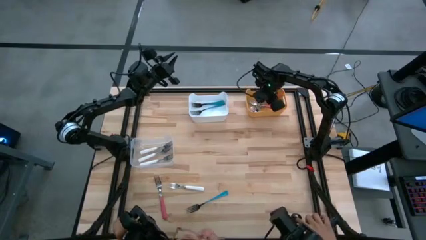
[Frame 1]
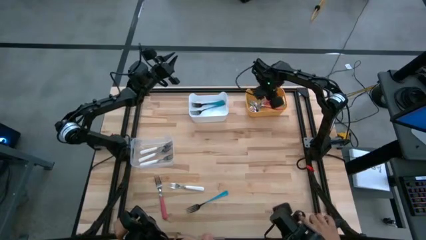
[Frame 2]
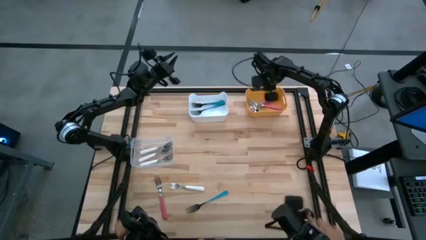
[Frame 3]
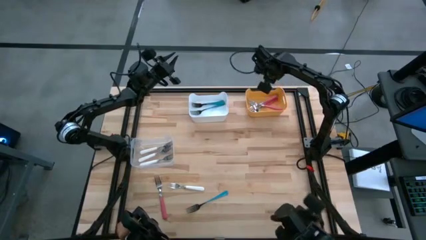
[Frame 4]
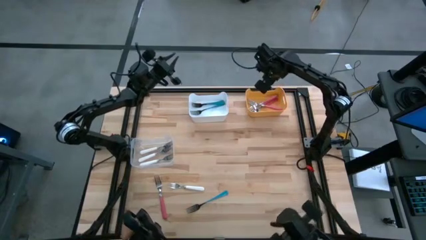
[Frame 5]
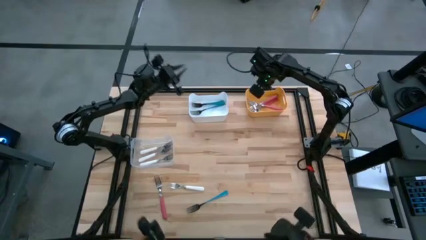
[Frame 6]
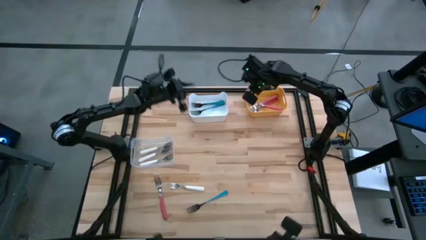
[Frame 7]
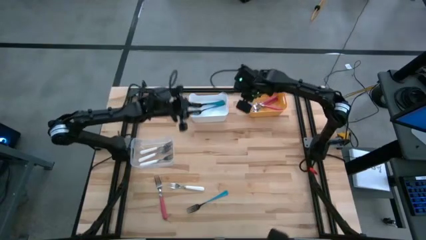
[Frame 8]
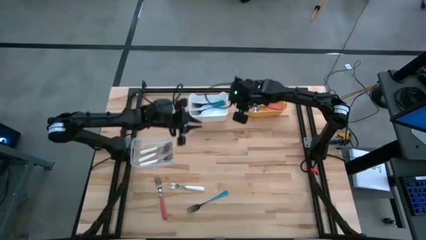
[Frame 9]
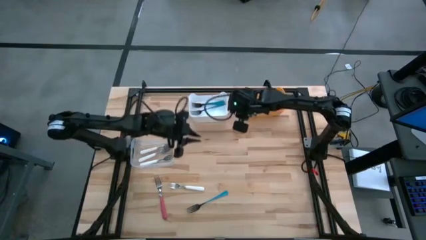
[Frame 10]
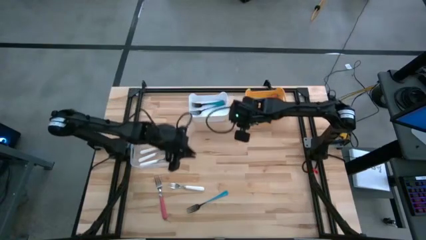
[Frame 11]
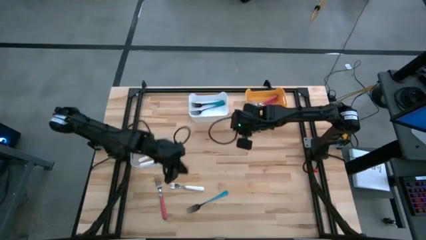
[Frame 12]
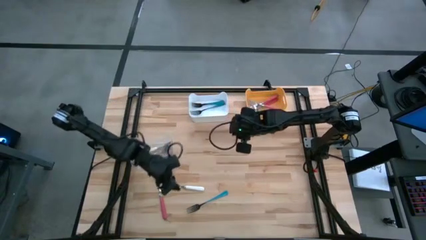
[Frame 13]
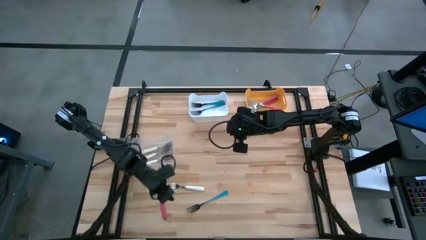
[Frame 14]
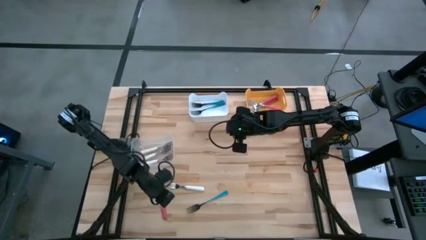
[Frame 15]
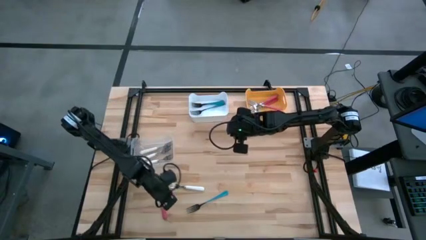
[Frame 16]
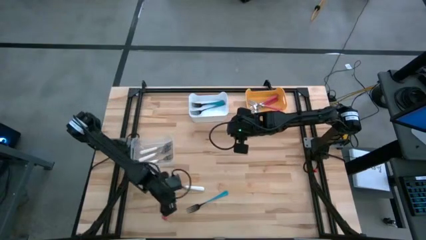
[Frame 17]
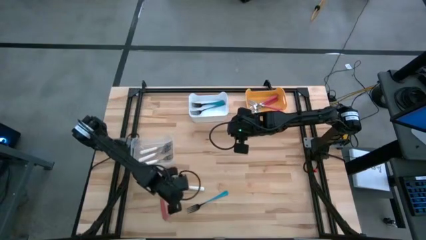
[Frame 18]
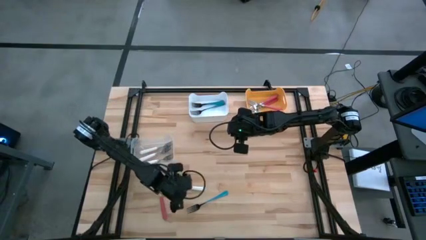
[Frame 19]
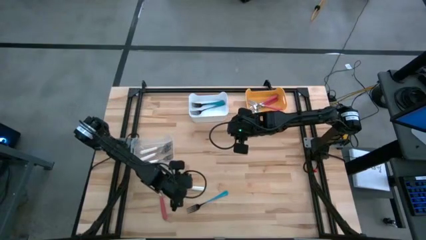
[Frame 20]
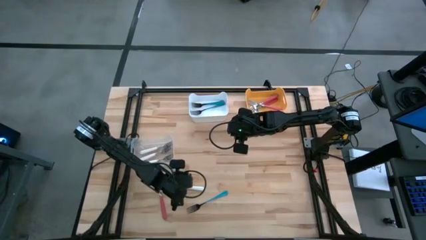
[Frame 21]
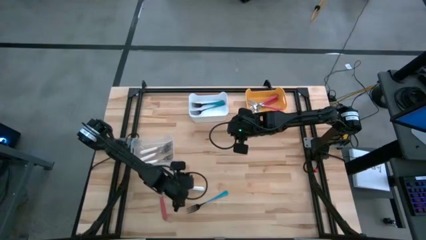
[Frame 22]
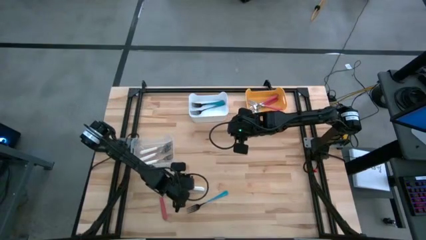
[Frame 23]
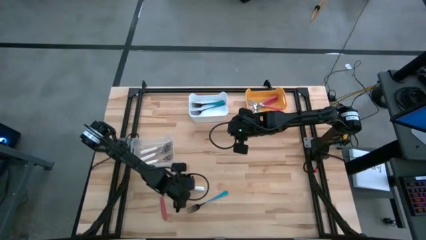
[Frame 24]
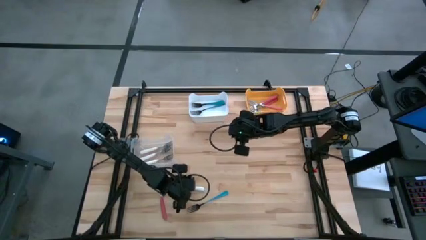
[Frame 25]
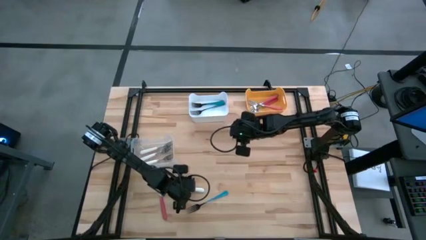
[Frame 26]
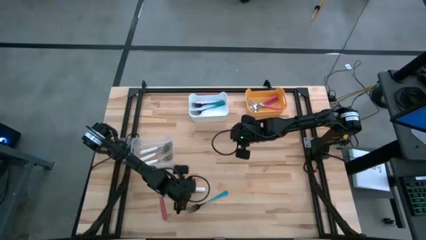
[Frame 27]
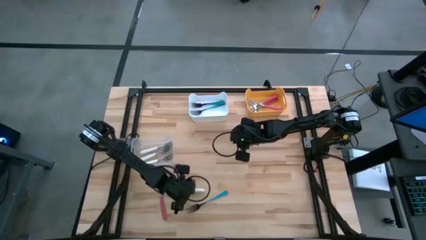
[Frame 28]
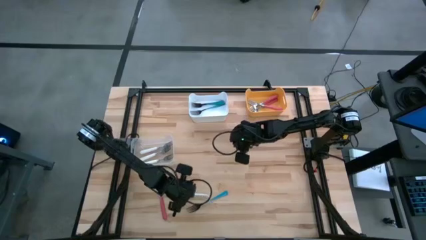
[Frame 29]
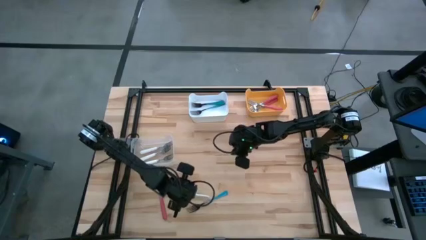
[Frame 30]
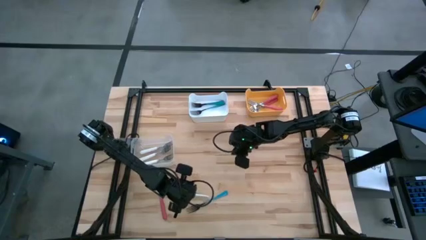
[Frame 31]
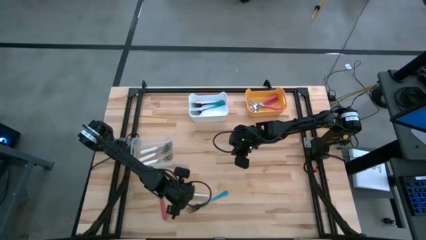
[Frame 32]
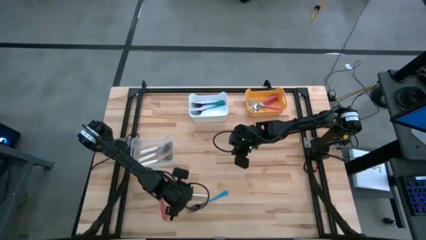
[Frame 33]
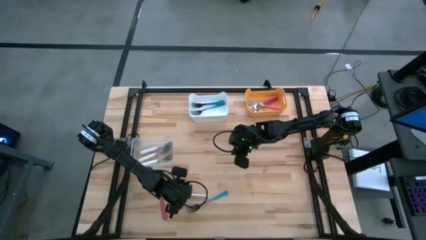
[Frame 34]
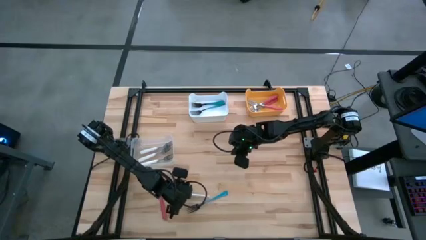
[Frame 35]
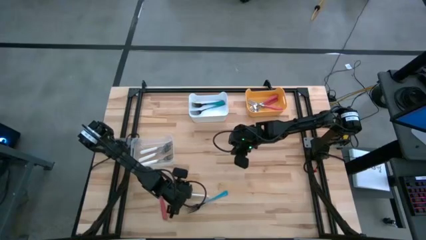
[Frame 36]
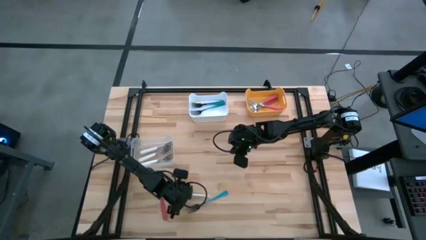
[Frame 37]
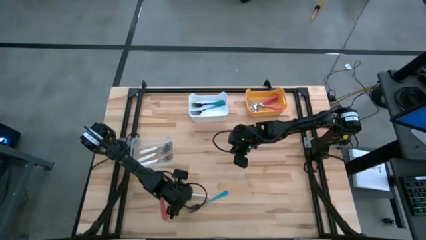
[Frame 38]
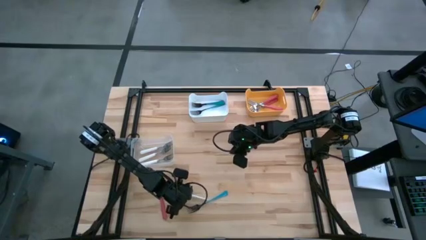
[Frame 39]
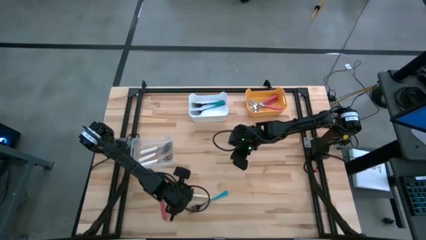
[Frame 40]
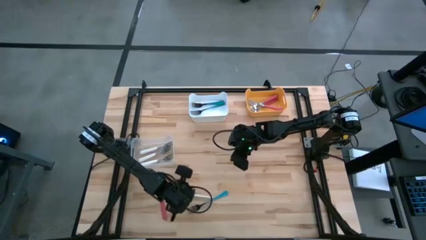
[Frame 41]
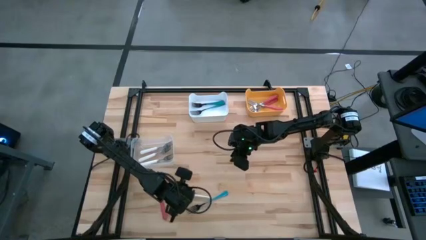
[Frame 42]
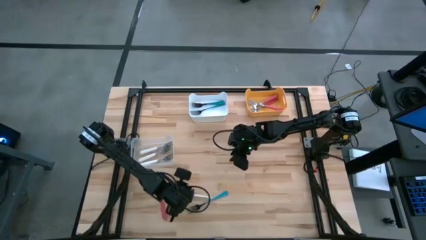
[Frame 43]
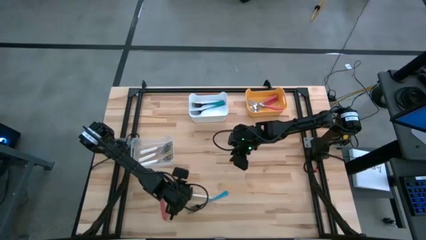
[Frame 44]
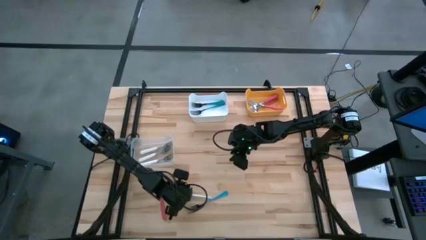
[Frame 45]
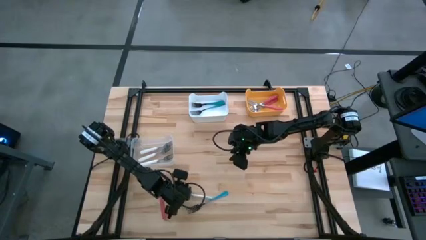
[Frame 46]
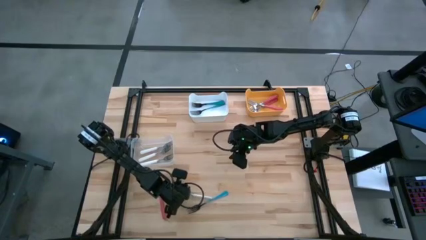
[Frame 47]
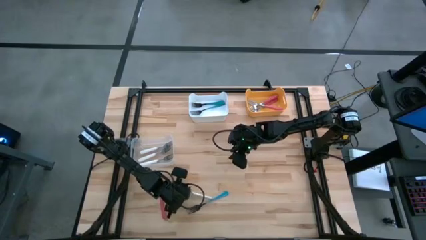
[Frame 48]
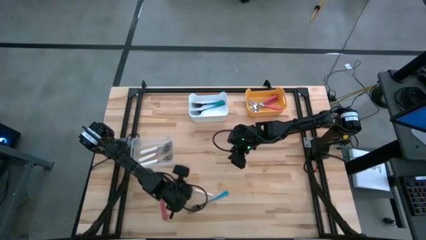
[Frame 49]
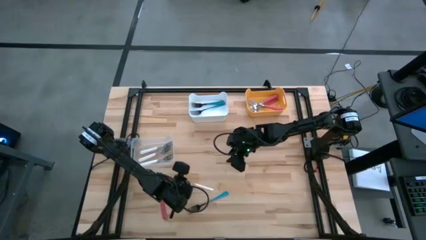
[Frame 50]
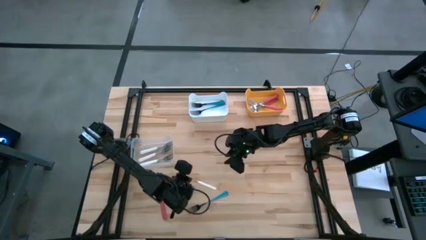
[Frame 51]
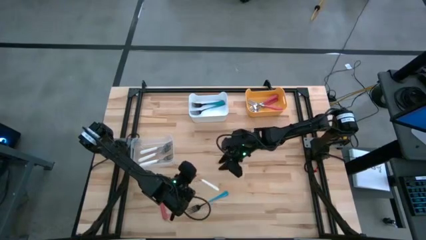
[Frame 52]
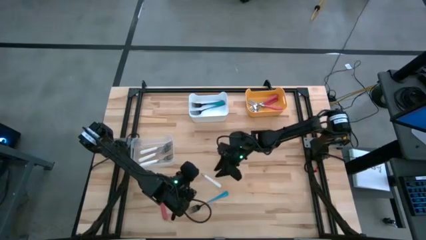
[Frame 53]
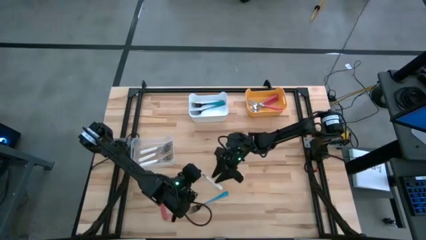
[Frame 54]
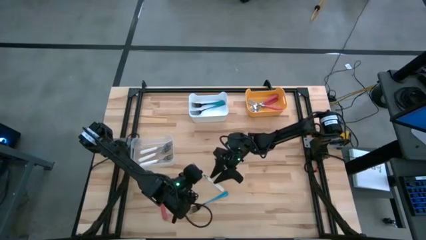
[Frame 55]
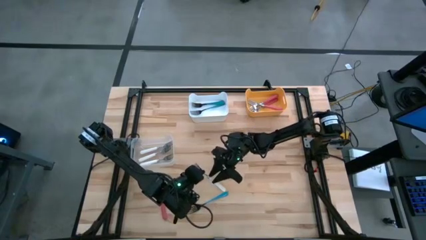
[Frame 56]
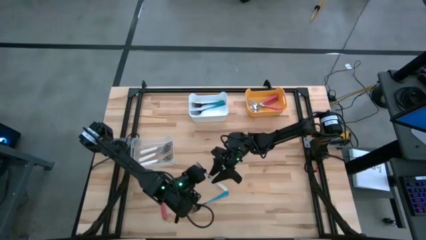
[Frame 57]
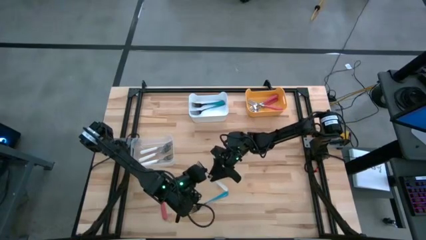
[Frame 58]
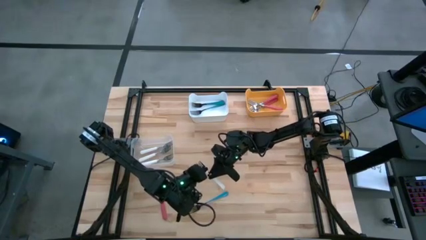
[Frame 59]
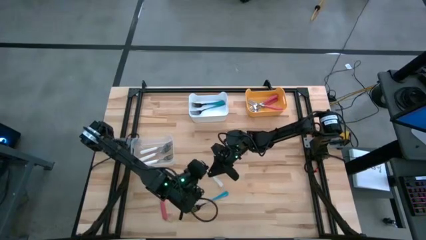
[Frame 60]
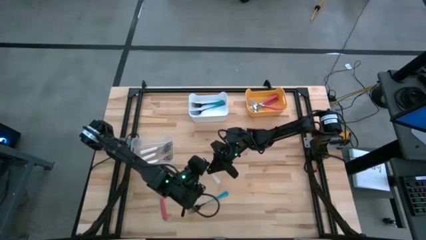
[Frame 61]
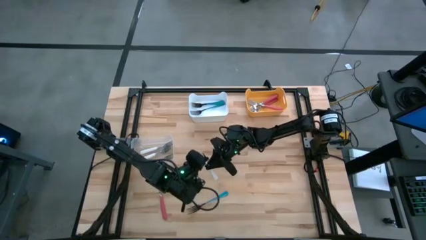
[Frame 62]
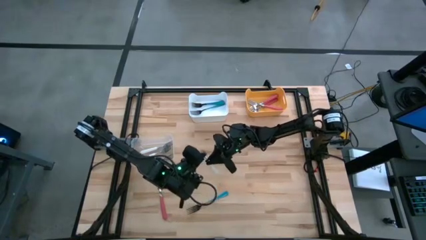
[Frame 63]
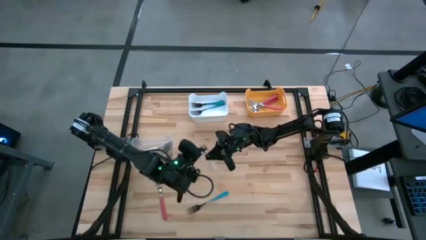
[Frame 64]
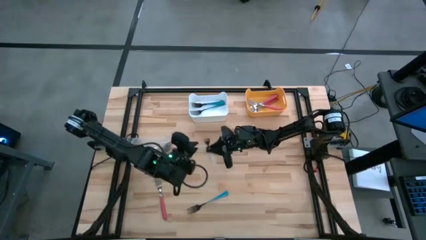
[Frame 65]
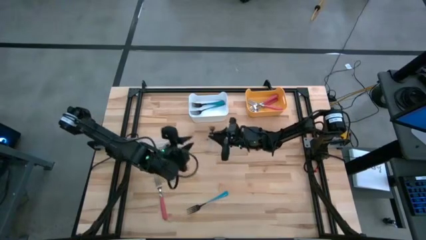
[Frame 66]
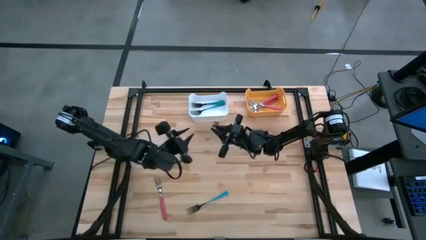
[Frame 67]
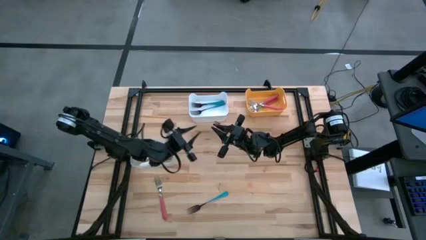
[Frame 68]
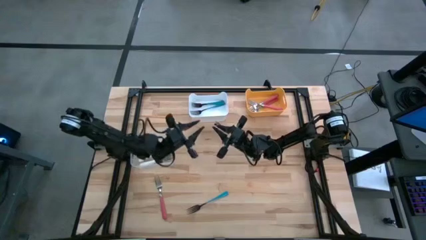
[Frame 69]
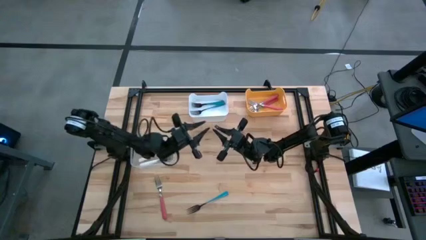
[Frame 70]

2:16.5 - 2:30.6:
Task: Sort silverware by color (type)
Put the white fork into the transparent bin

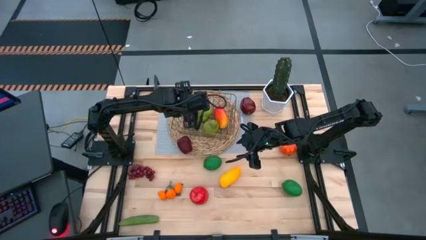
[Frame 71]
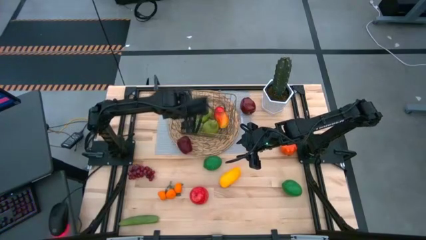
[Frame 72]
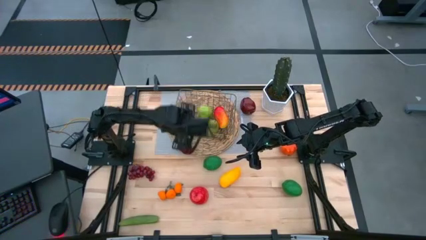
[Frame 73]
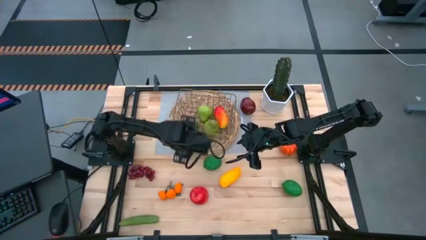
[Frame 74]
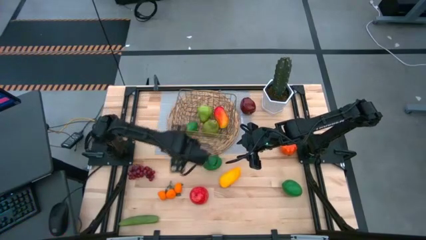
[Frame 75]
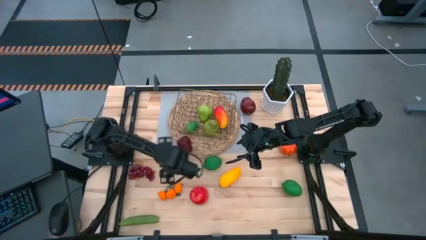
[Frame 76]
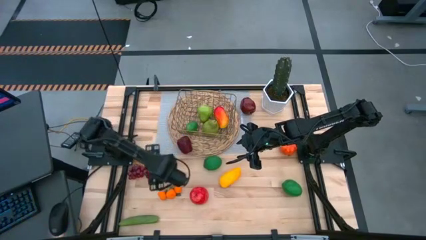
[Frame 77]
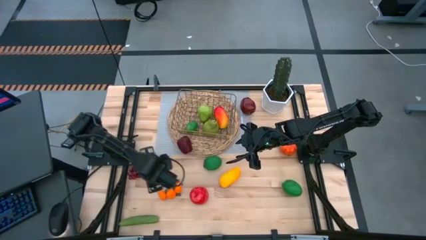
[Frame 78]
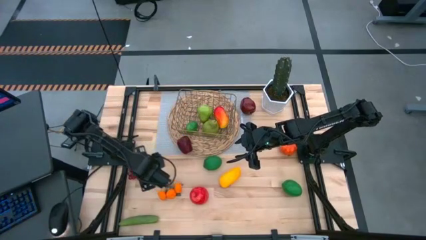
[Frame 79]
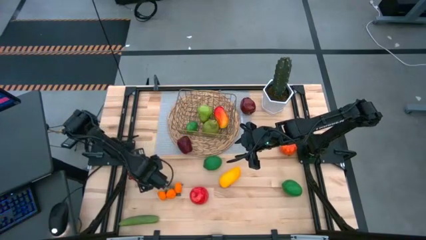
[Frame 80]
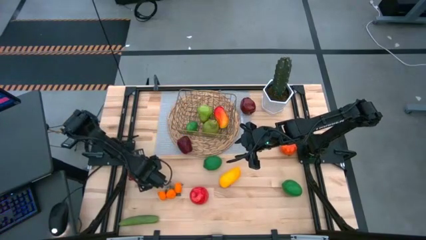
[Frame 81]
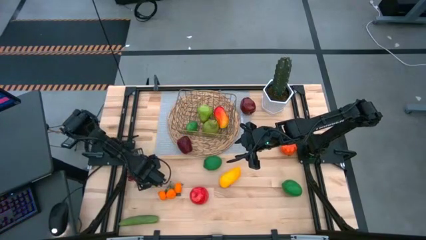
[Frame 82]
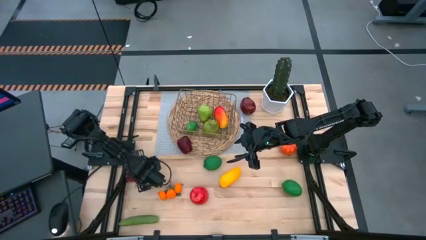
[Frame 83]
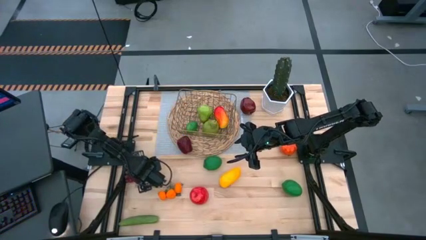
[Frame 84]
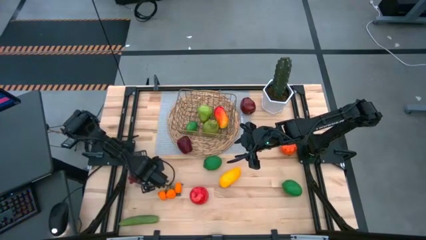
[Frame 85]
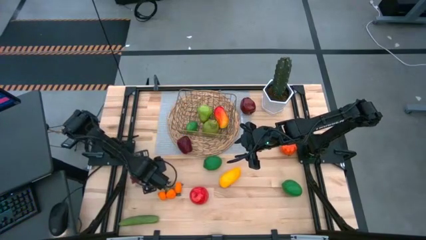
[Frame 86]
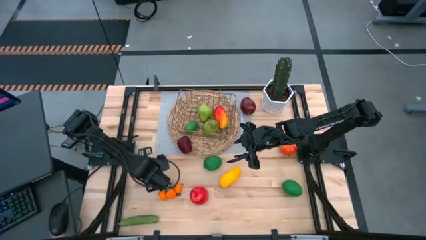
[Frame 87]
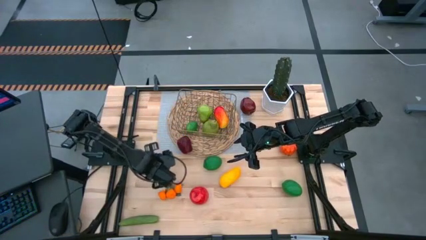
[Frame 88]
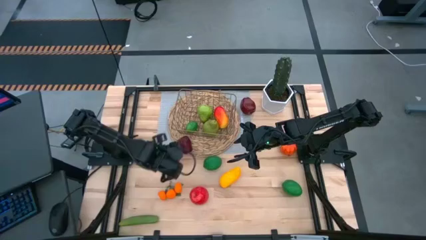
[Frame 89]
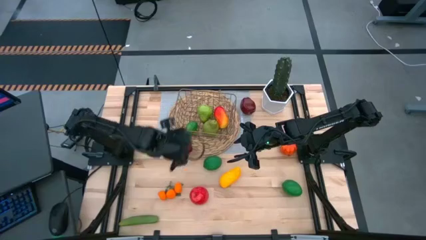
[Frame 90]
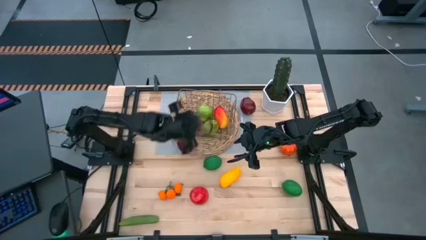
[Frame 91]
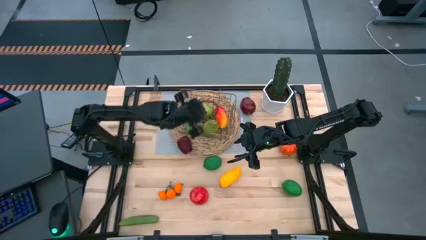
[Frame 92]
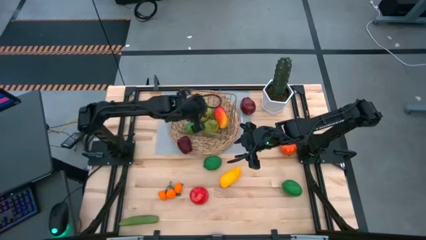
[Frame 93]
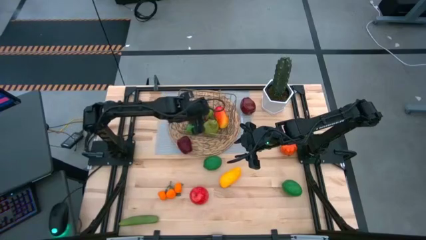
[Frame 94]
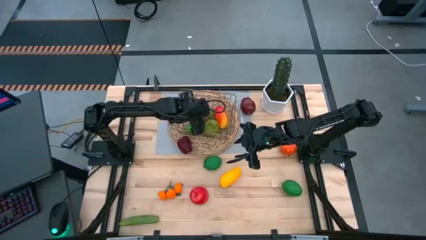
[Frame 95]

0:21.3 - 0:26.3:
Task: Build produce basket
Put the purple grapes into the gold wire basket
